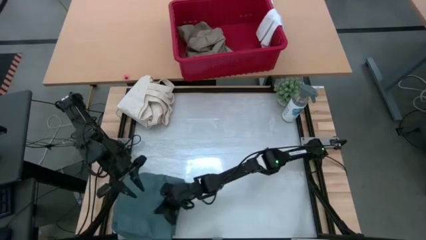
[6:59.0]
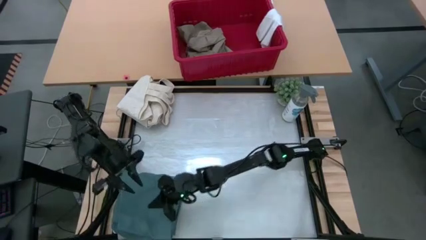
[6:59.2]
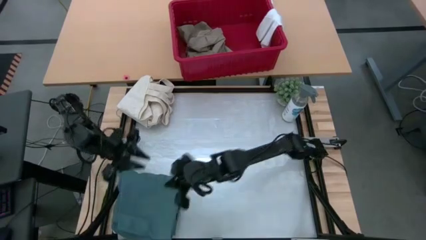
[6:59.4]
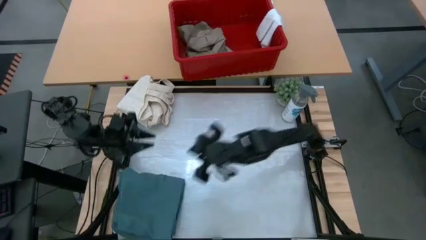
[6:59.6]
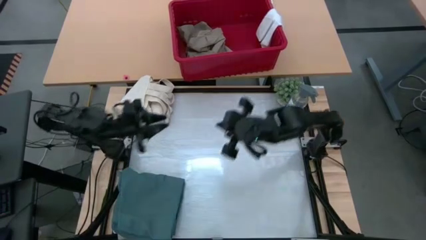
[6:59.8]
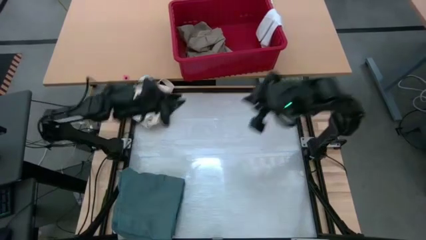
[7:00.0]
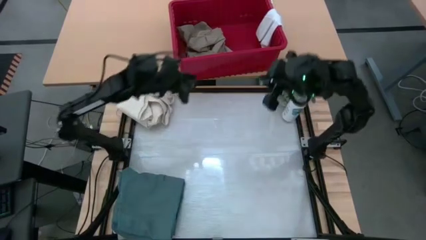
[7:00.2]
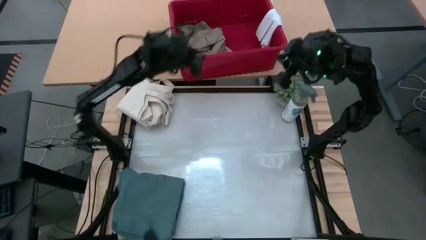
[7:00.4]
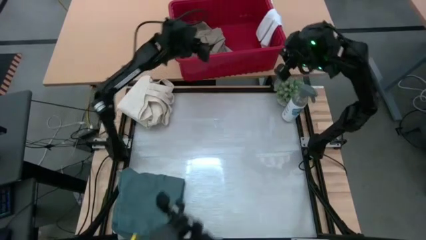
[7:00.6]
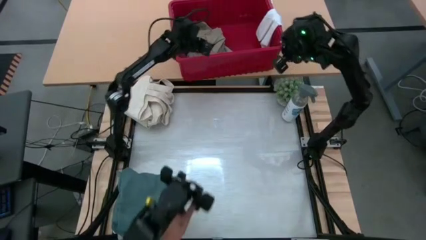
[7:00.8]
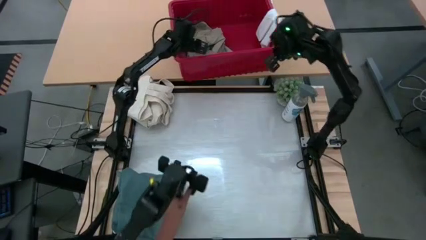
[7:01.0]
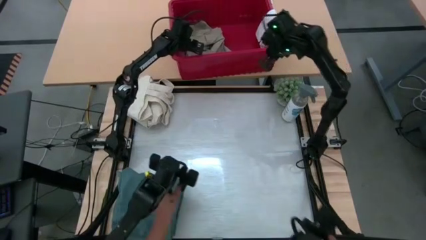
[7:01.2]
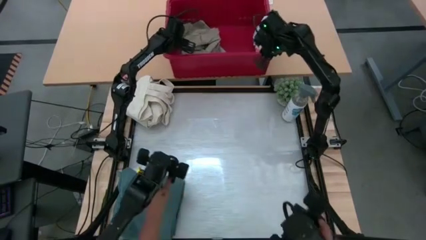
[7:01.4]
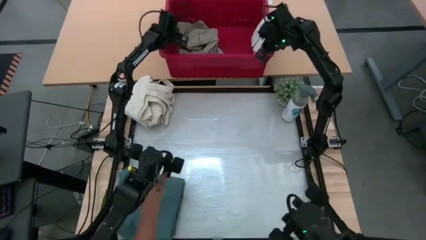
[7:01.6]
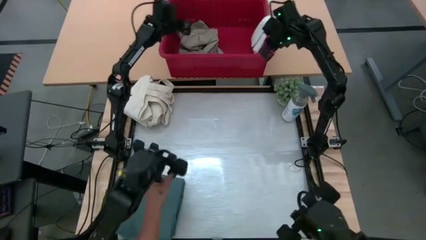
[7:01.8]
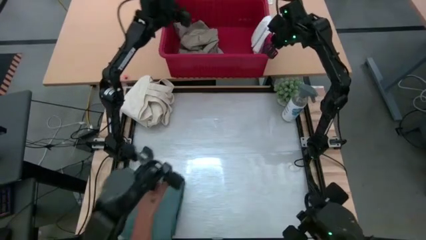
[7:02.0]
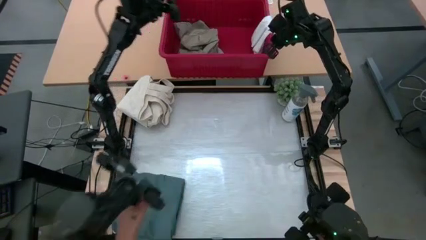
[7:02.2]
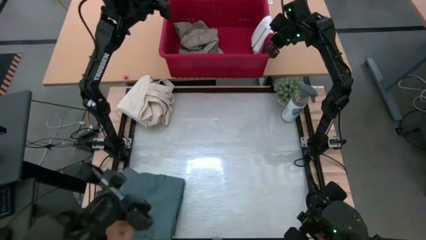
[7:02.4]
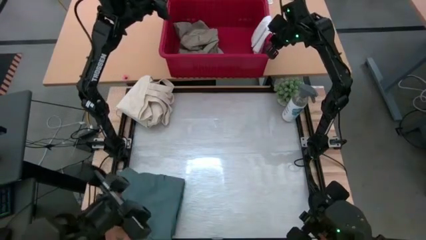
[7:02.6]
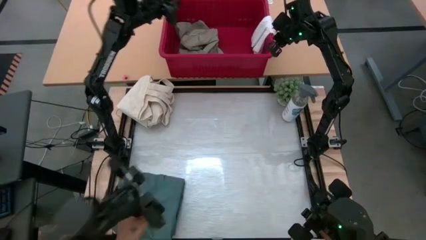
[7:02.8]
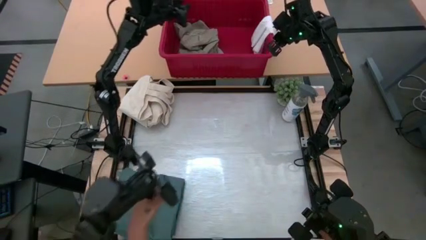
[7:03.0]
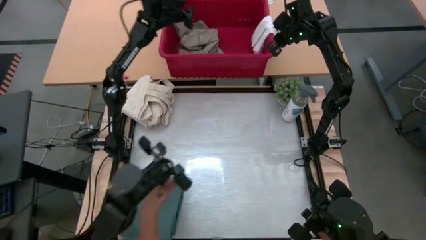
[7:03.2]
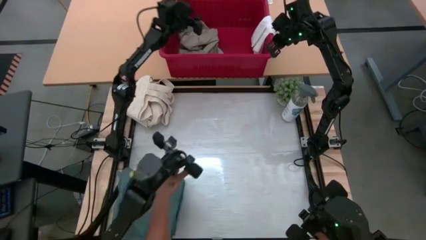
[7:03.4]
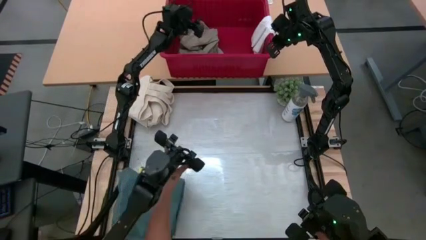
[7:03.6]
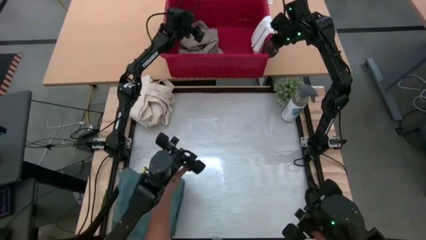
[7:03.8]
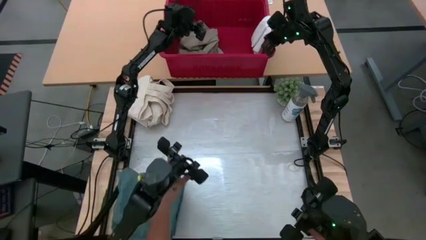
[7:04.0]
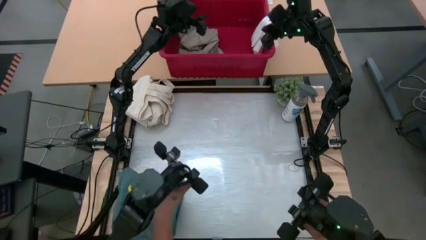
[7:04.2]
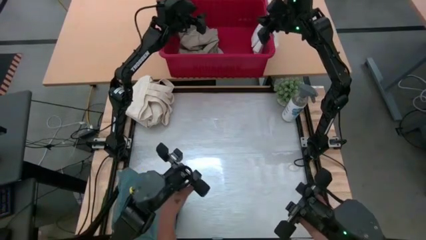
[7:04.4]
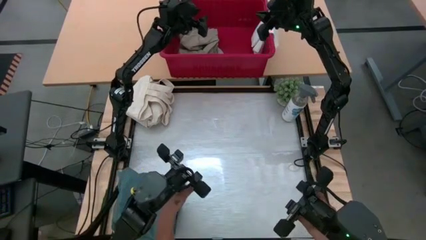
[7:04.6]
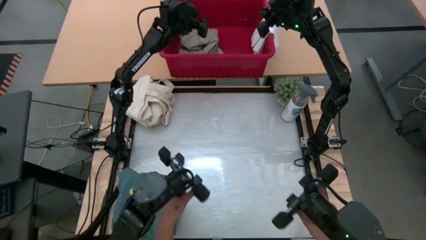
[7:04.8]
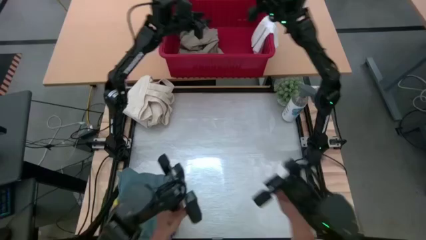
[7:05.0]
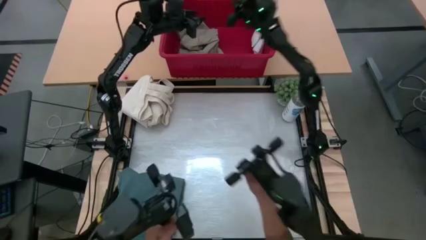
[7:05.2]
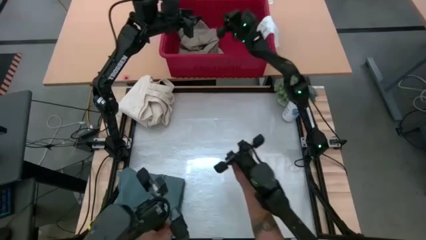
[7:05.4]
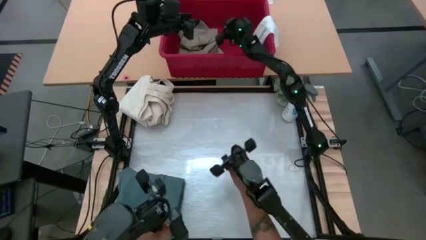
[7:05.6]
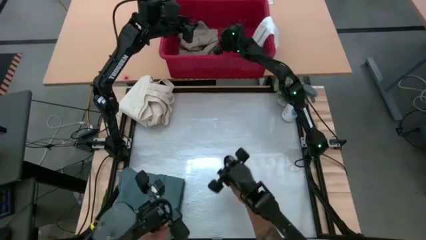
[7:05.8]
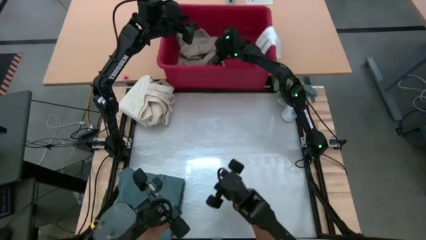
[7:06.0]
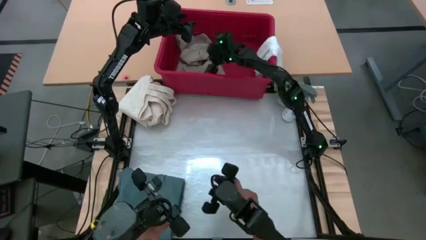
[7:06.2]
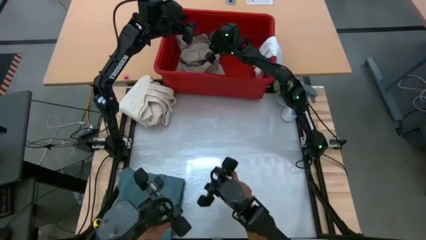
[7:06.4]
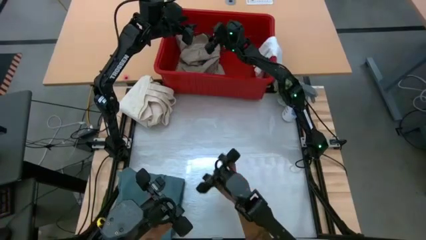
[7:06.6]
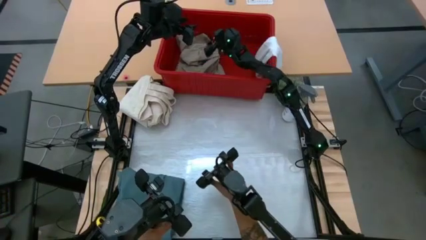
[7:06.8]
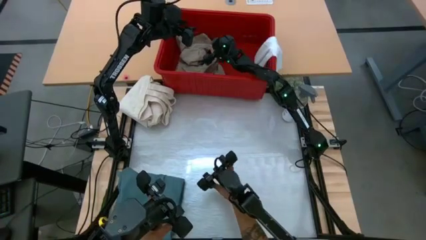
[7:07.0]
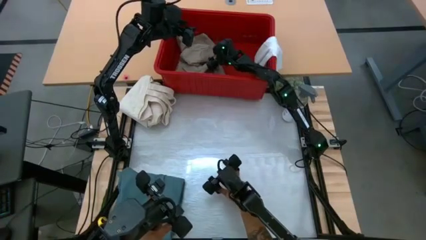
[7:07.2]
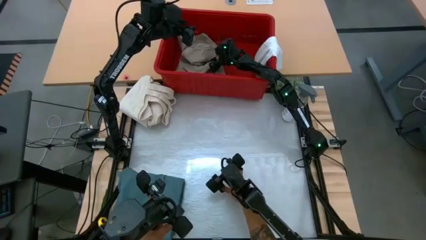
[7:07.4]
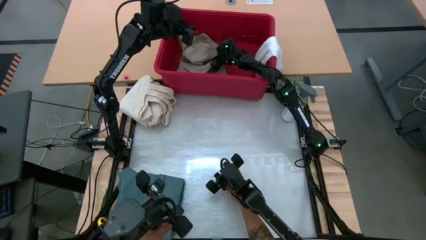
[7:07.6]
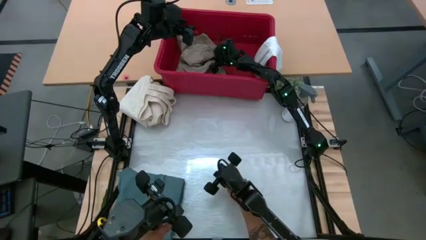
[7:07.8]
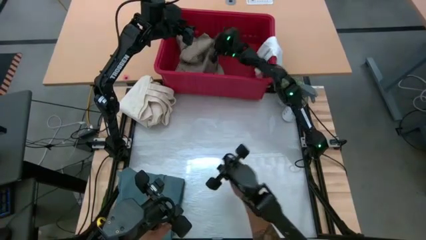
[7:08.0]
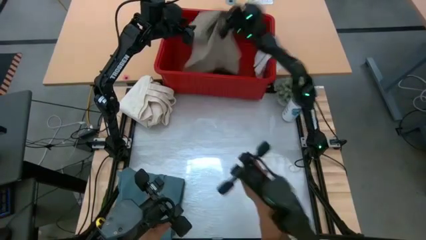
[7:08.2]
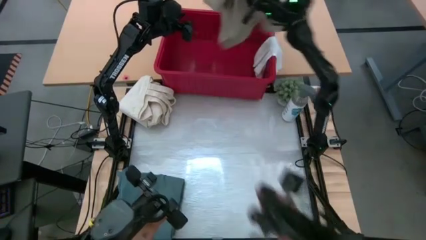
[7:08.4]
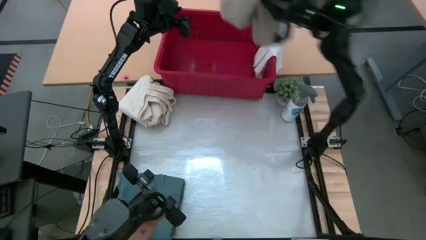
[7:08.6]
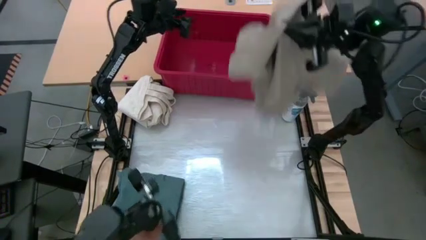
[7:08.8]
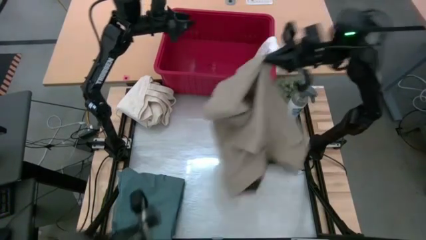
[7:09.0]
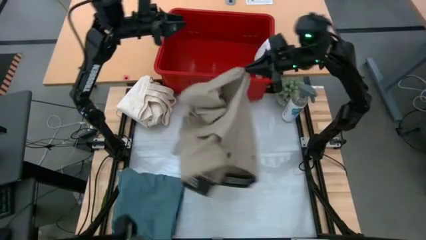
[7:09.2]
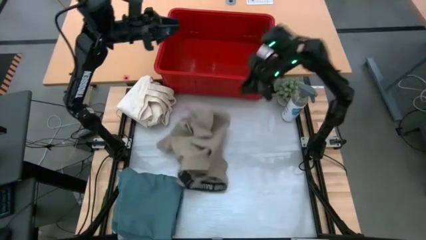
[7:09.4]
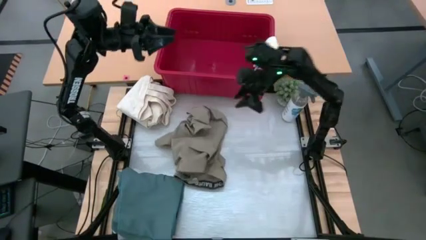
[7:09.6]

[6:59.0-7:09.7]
Task: Fold Laundry from Bin
Put the brown shorts in the center of the table

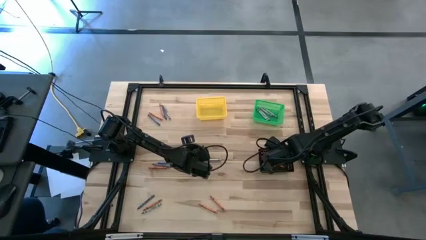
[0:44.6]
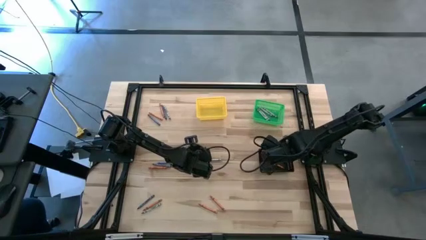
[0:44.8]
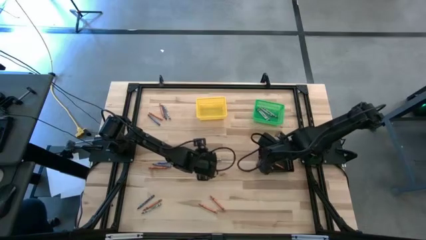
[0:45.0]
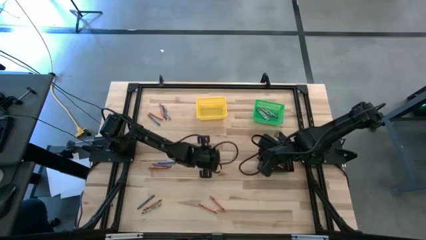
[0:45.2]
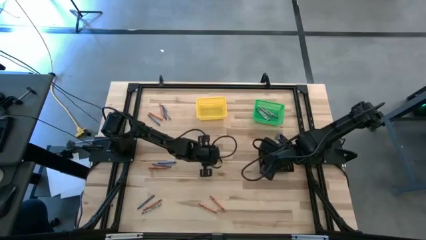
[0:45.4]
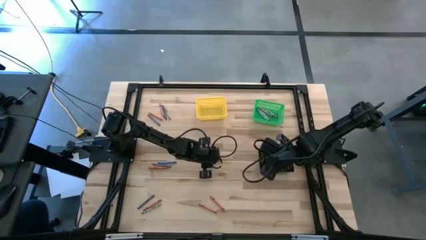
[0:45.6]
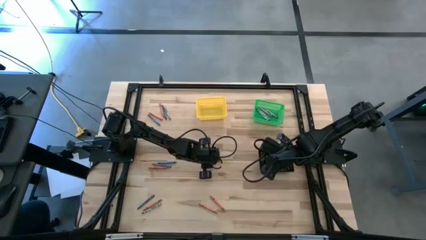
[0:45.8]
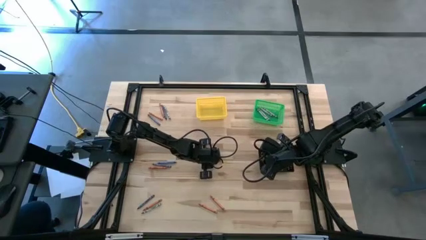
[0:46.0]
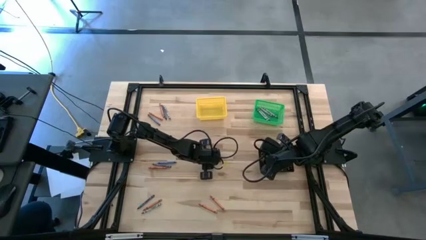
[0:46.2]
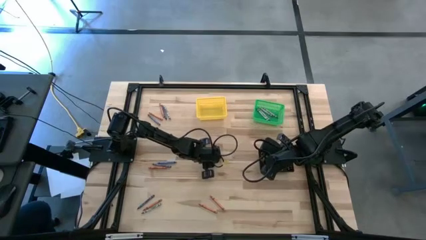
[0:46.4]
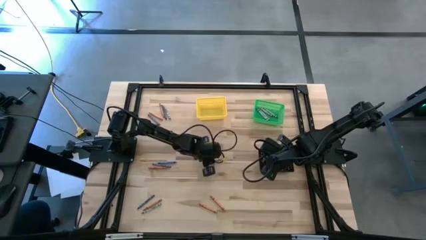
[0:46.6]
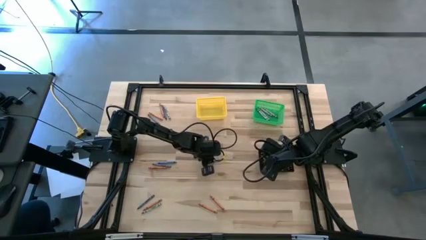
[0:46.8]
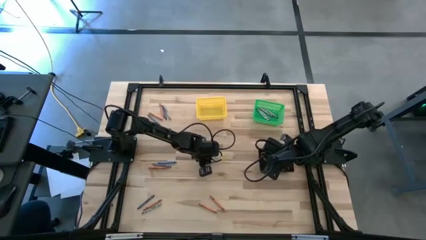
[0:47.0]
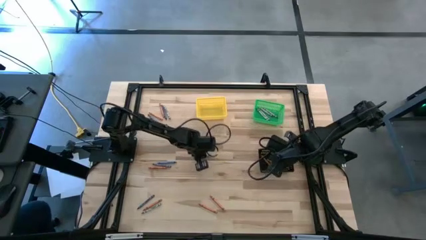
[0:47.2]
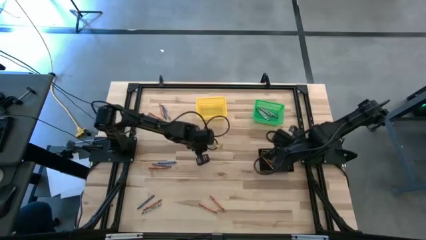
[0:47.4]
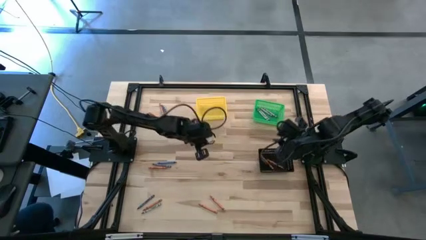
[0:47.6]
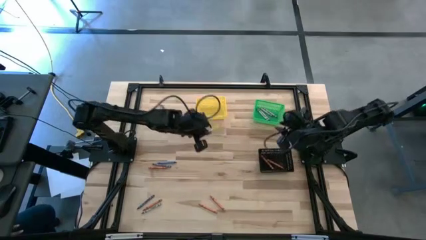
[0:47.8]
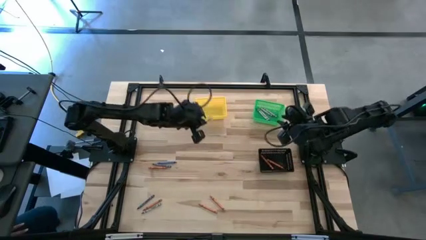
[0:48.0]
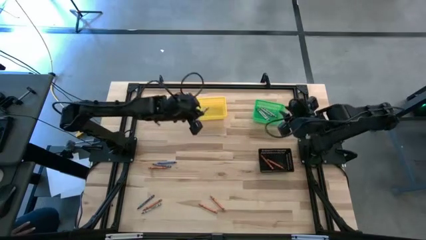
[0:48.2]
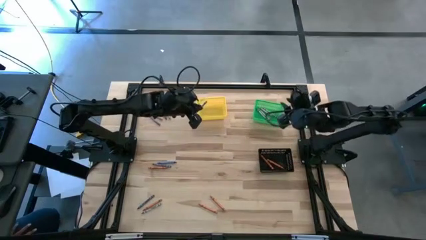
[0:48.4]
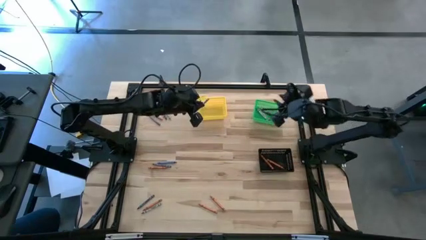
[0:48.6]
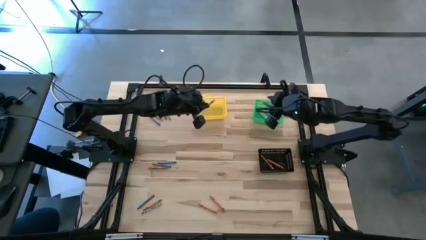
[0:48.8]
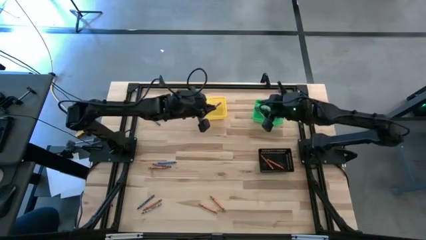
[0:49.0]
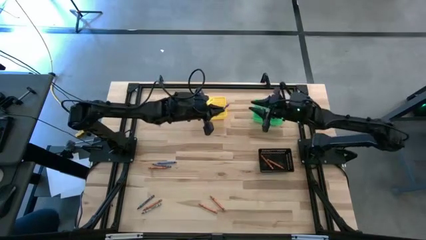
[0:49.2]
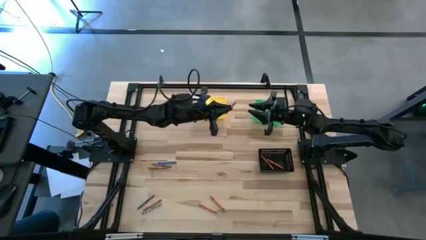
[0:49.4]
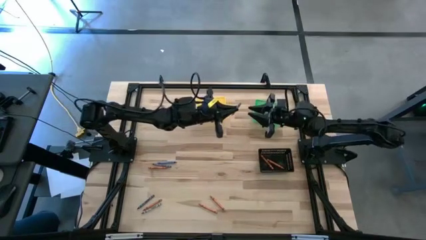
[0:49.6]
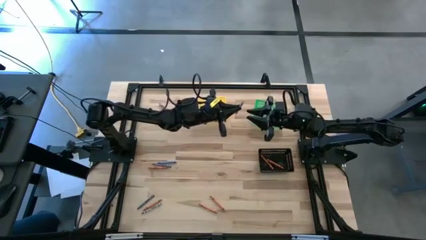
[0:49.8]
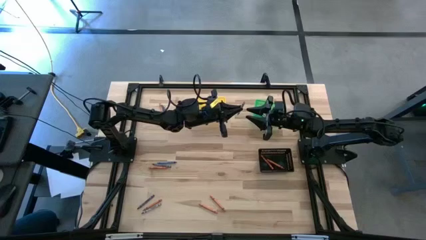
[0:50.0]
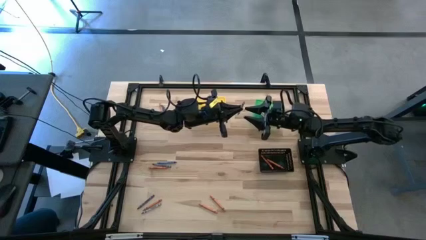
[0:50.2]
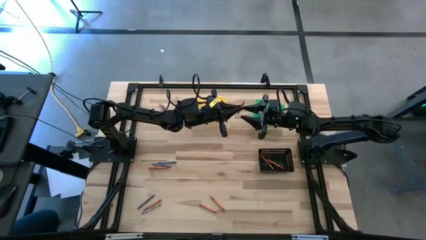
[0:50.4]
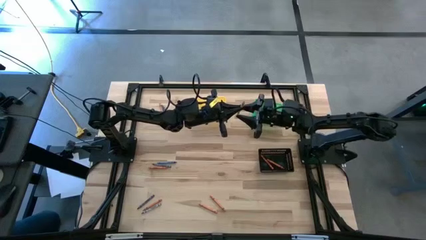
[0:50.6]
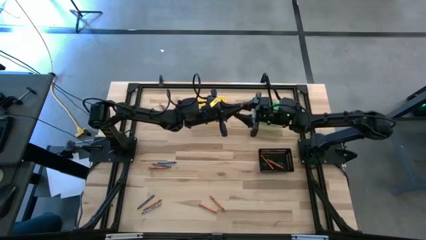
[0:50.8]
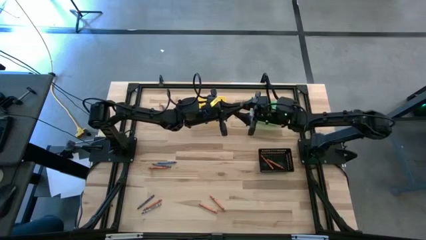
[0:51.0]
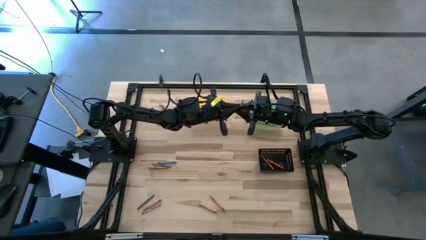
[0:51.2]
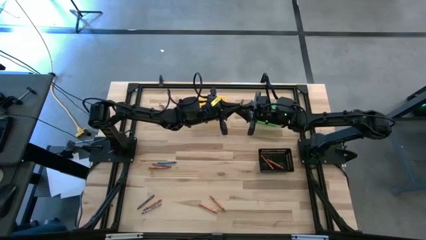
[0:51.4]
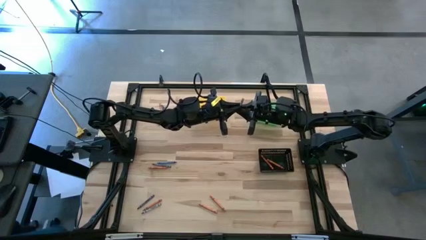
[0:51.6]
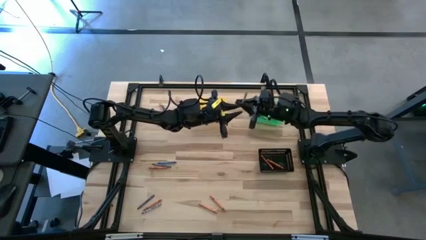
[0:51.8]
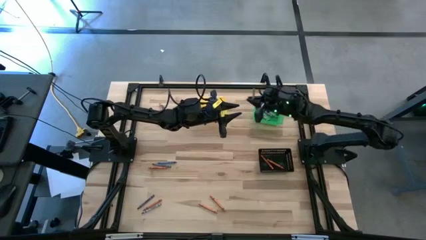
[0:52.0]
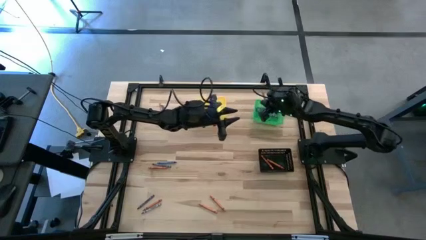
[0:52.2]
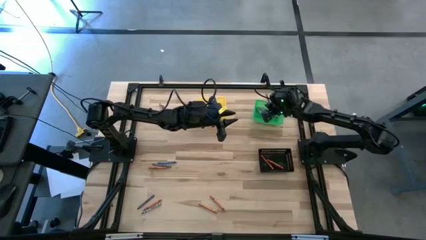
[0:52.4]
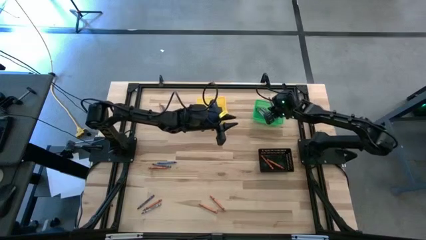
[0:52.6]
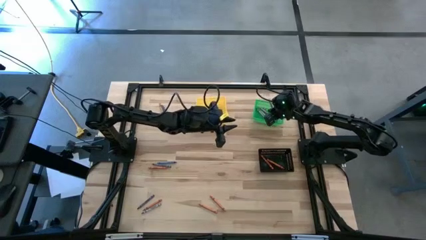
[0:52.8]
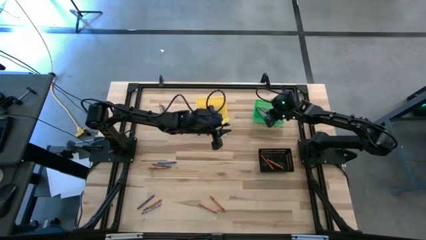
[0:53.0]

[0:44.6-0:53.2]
Task: Sort crayons
Put the gray crayon into the green basket
